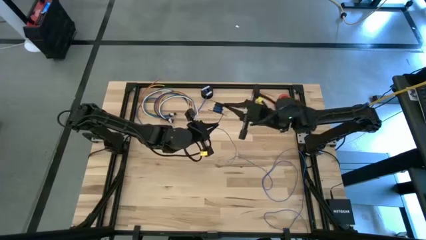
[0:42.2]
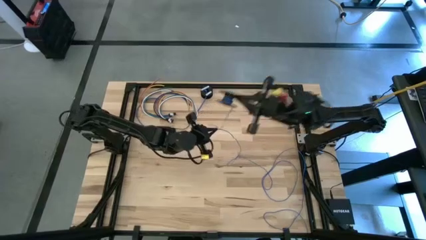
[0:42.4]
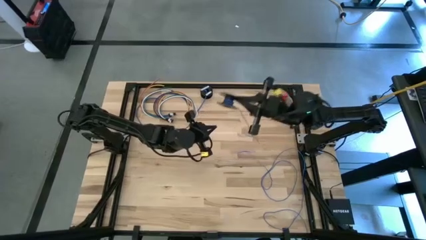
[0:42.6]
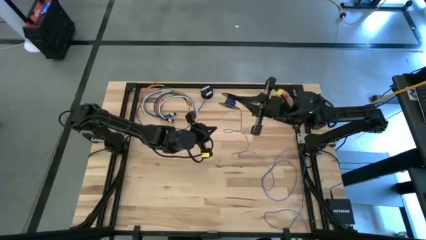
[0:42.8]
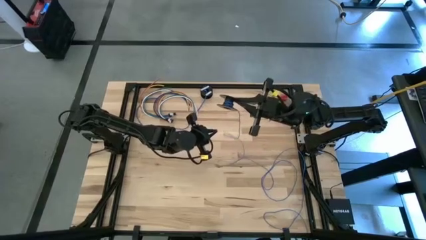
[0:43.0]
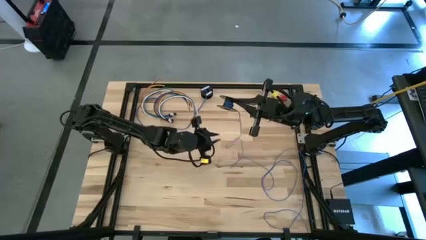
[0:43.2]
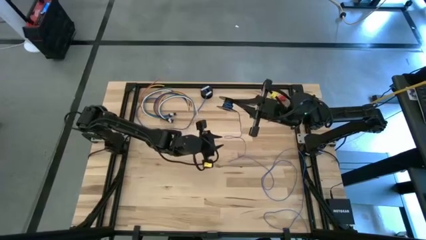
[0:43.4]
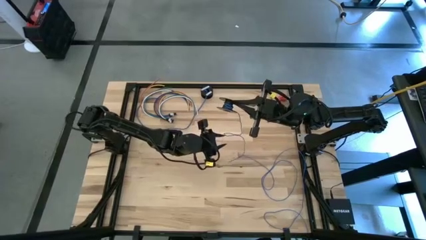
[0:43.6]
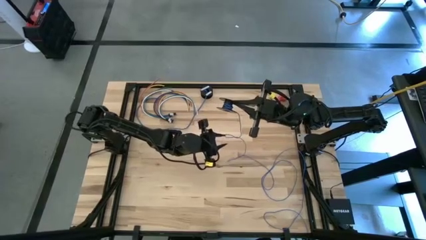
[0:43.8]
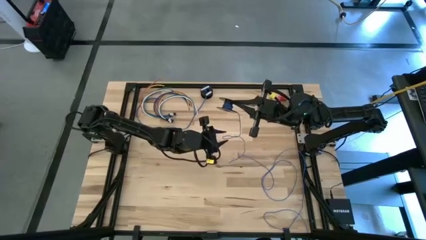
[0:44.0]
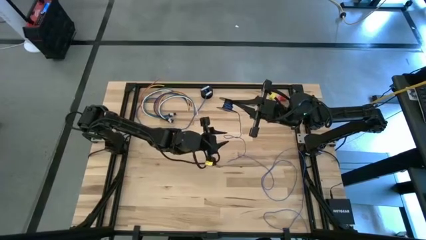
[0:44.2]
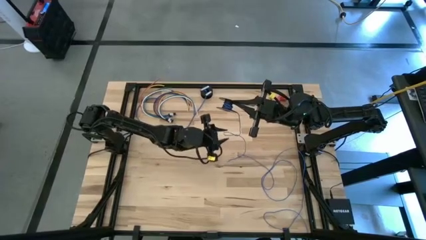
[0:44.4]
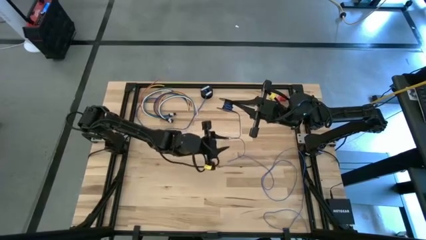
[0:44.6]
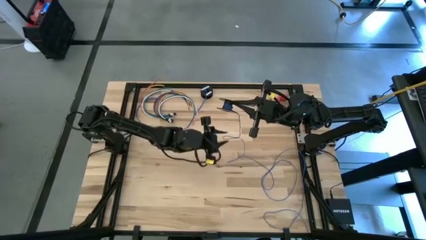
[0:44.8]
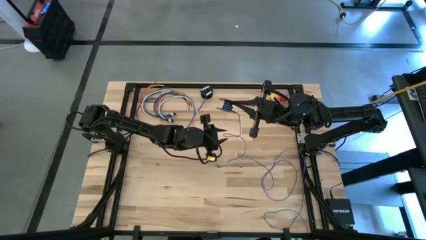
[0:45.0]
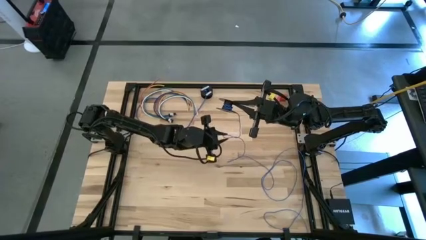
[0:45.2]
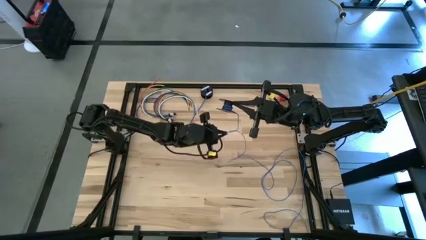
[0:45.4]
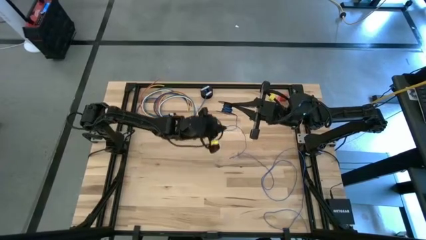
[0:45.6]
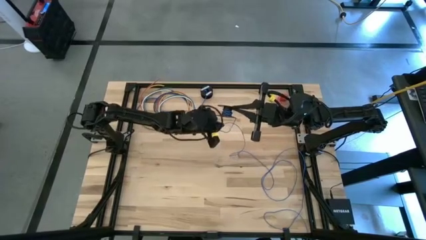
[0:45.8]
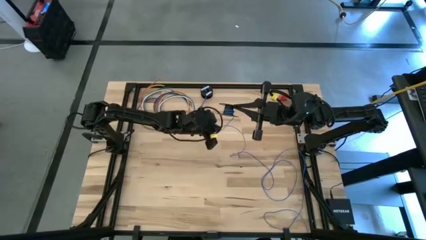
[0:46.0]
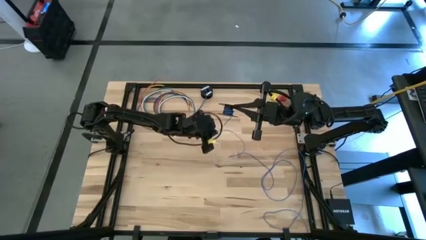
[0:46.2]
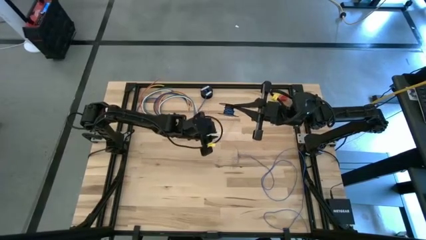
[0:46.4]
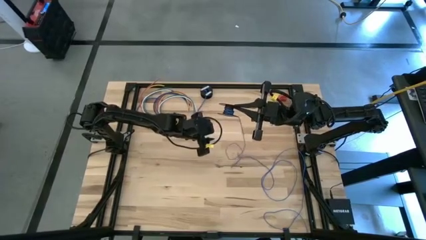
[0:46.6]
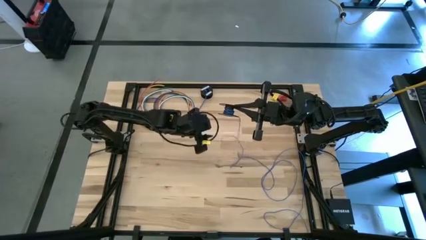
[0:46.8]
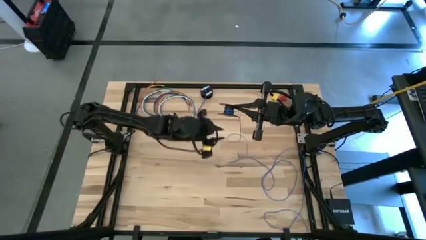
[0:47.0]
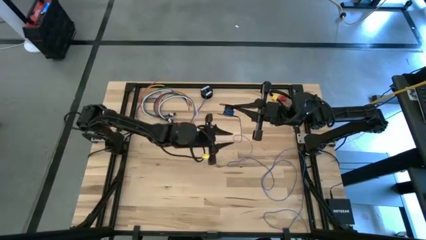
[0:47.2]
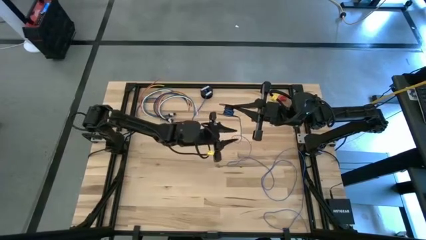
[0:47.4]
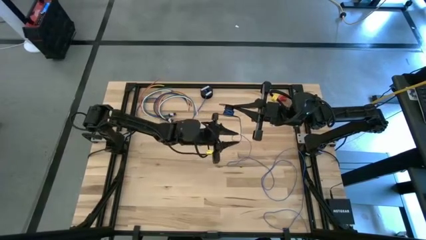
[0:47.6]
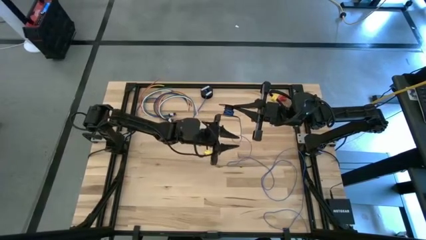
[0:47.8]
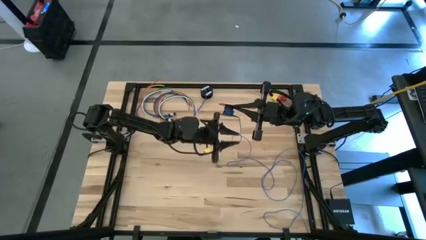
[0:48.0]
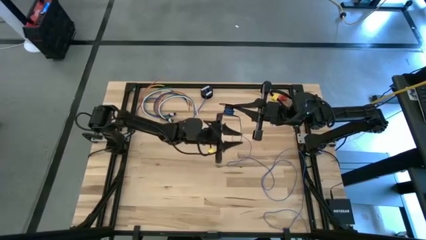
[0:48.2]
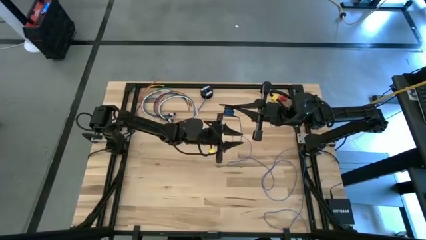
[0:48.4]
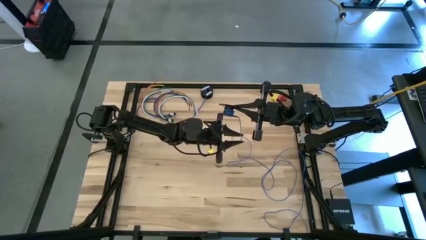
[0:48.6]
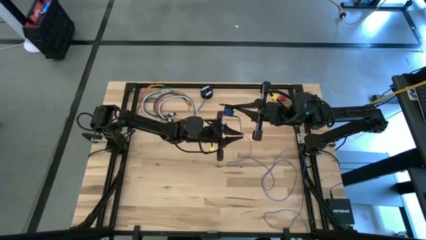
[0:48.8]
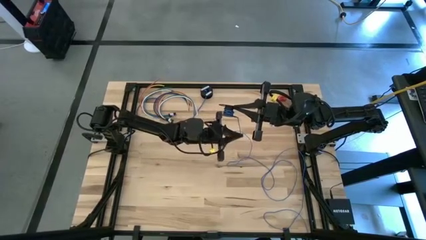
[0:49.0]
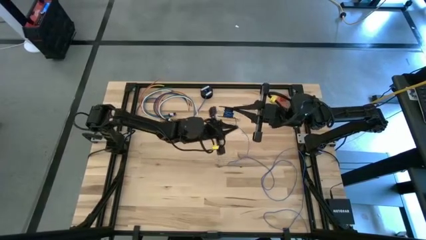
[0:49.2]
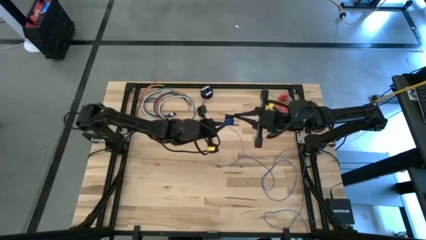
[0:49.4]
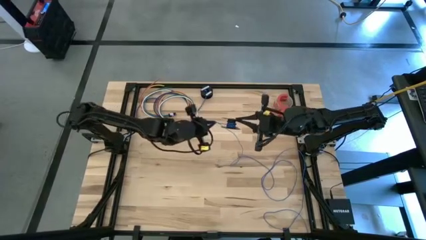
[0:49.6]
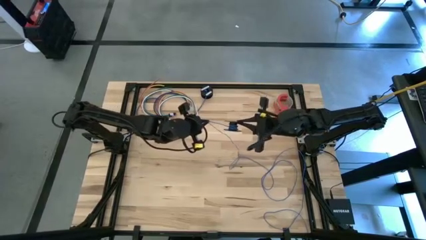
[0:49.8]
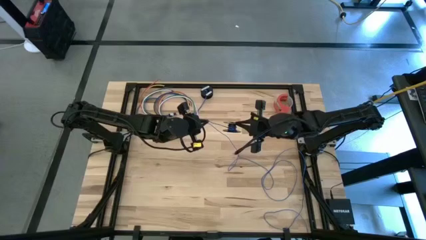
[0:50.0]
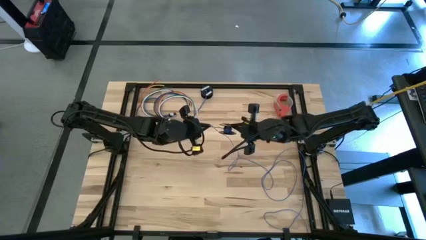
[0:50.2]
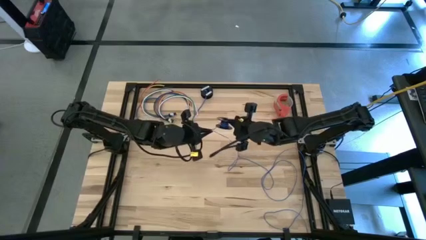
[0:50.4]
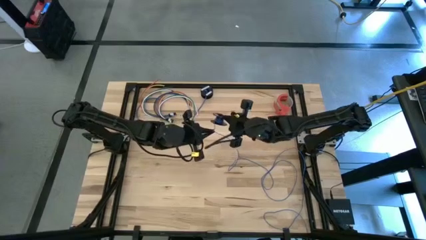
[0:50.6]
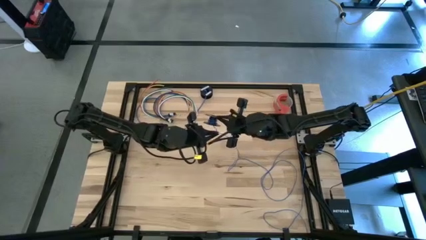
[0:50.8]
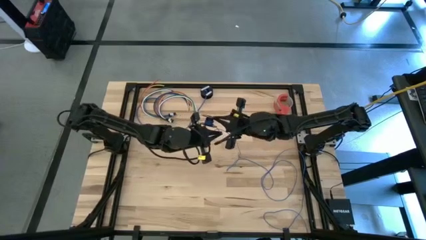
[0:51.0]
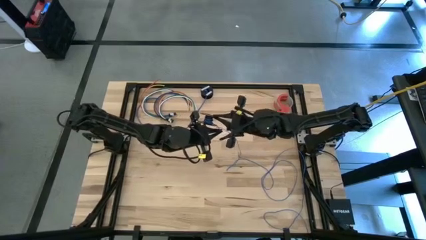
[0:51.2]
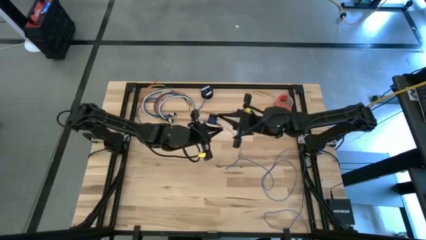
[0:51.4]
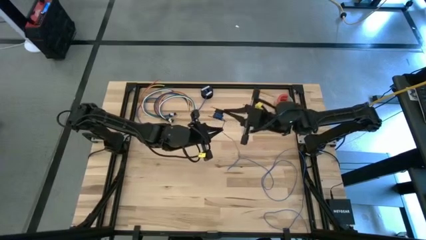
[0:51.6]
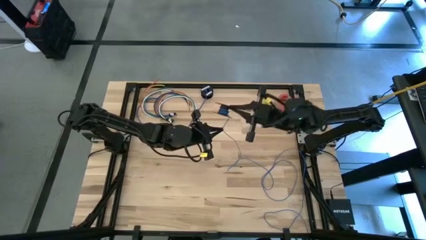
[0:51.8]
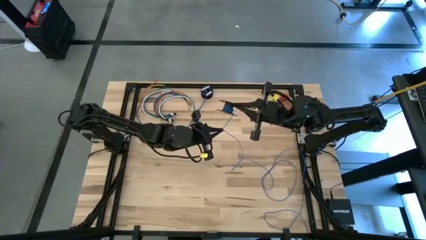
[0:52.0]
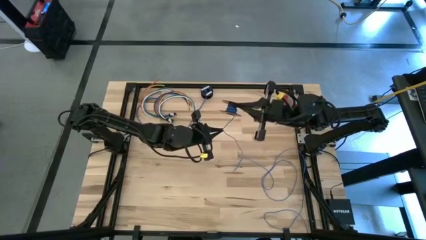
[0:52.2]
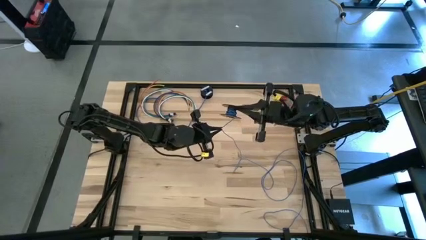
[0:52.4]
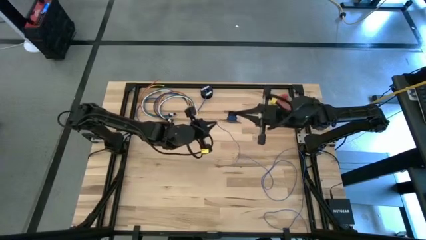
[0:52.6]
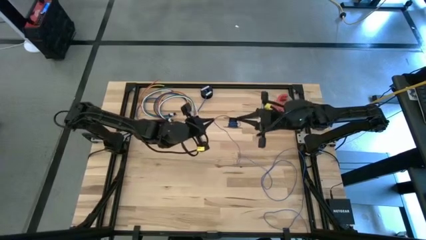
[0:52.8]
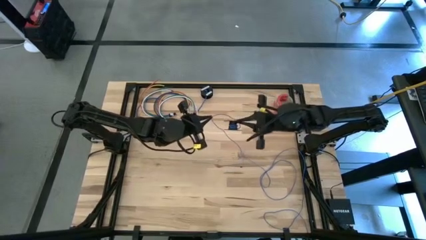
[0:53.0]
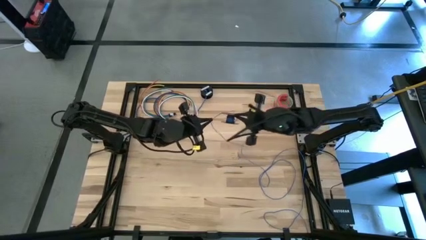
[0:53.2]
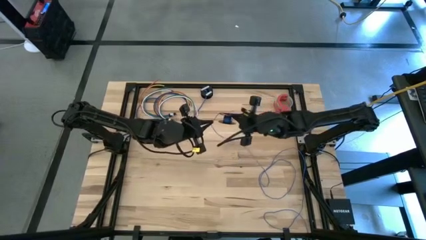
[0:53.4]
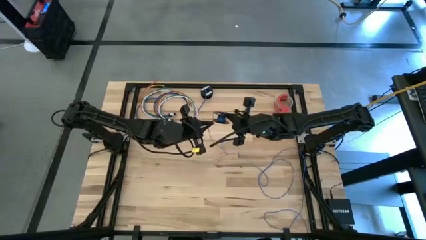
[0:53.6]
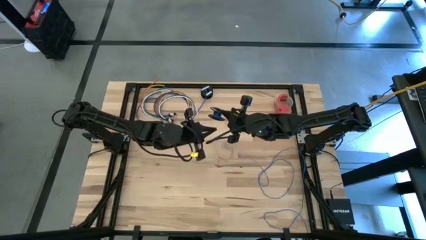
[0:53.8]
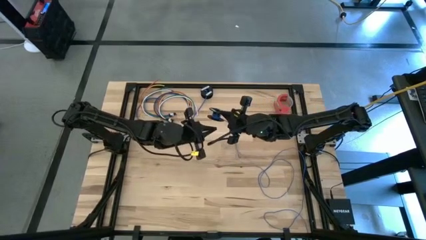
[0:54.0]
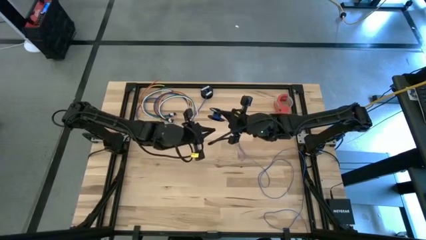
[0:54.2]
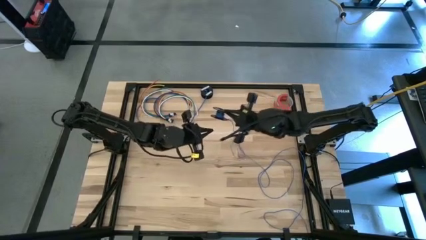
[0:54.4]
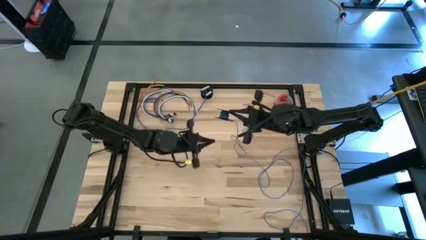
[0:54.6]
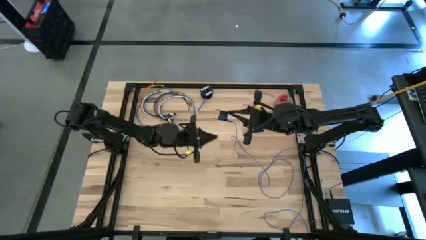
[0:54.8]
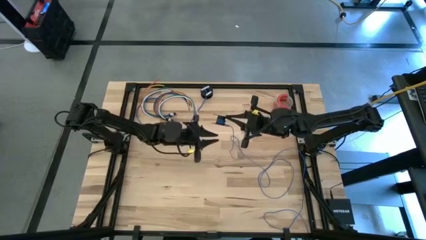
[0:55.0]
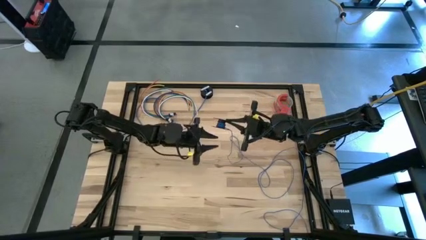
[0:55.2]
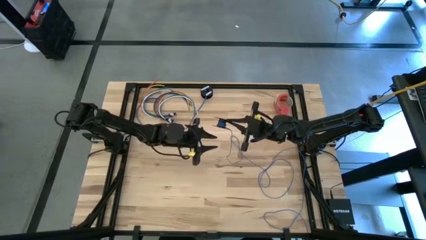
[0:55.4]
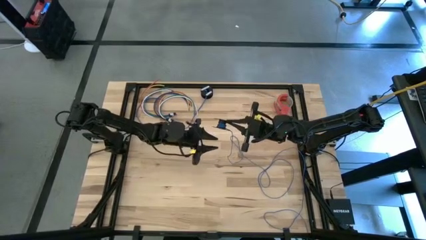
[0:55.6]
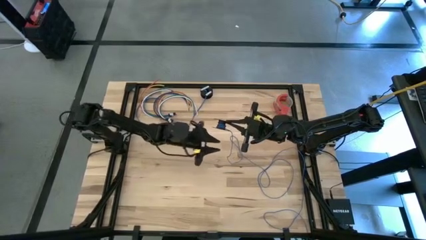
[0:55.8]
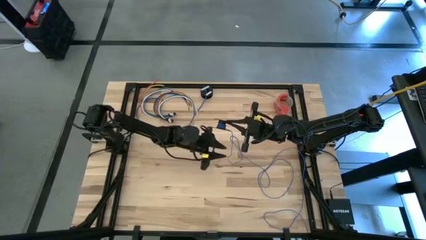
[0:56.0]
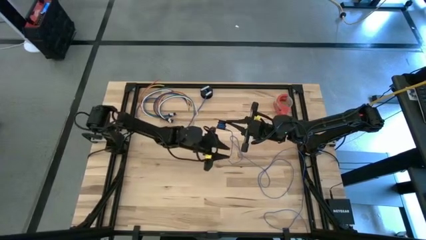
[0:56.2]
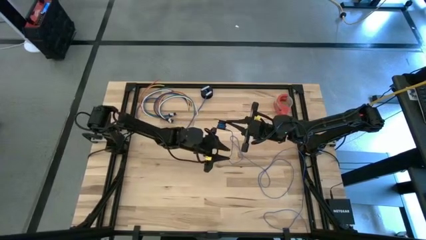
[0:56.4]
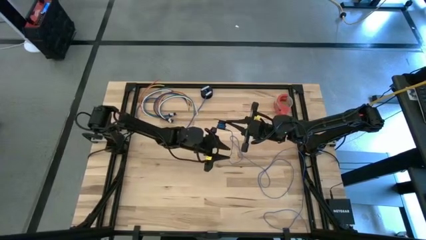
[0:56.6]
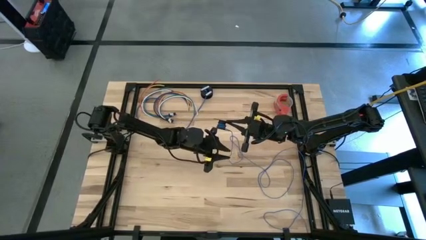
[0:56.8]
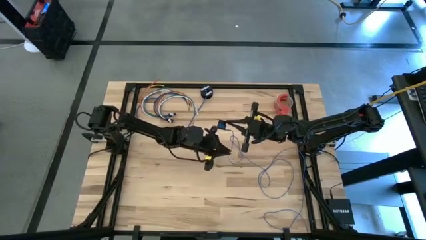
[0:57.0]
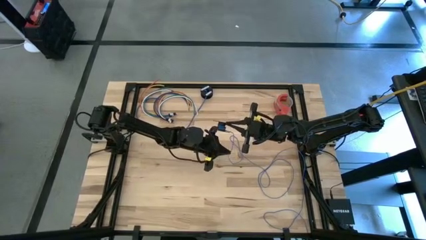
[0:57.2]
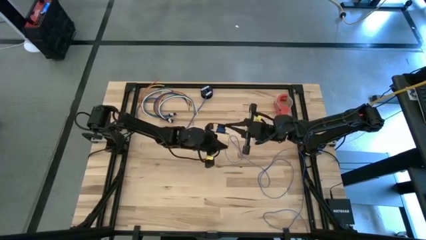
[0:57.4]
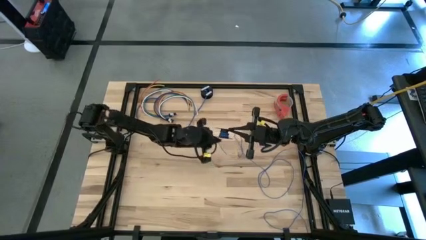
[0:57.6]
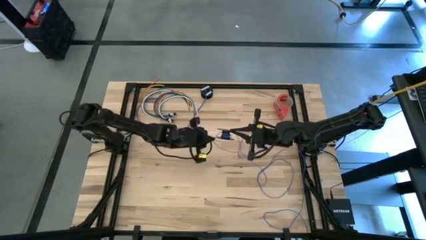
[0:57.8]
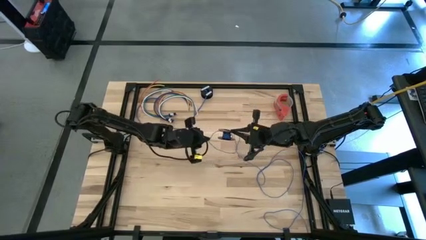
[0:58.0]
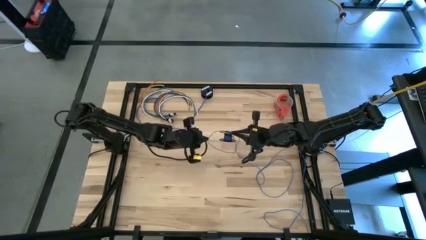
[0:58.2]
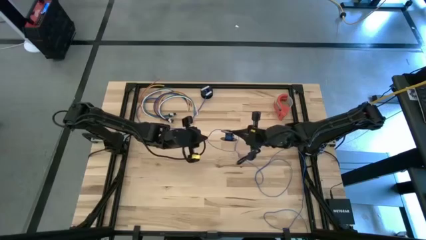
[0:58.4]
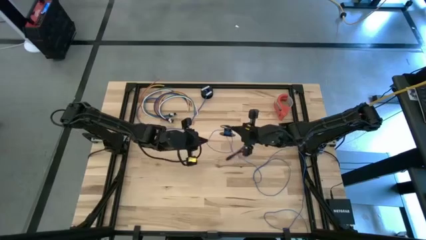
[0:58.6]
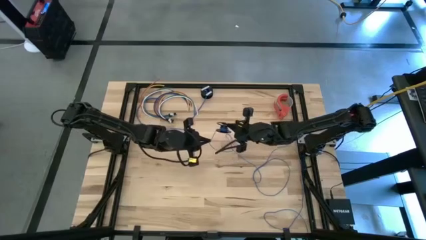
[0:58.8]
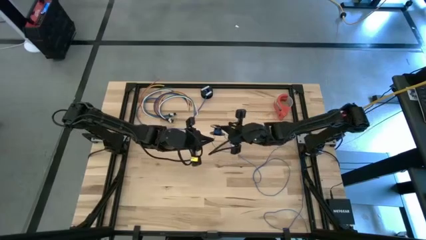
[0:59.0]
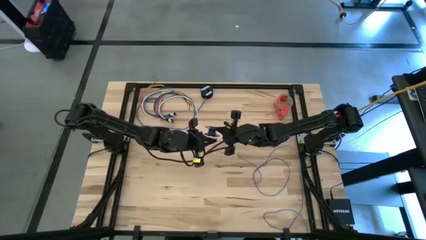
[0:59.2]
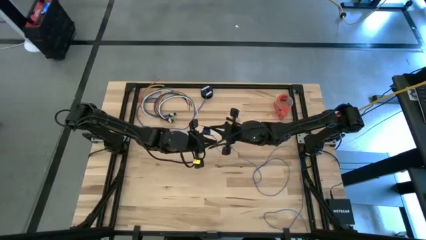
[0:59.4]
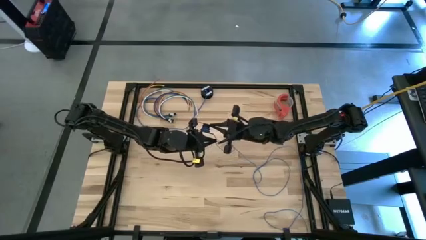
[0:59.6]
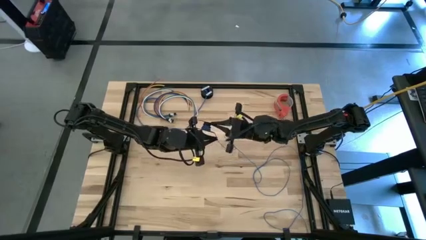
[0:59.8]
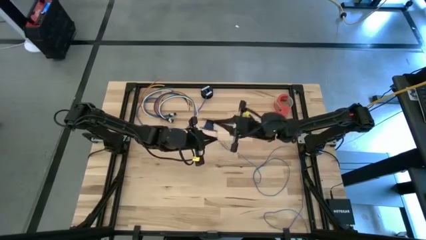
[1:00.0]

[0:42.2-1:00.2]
Task: Coil cords
Coil the blue wire onto the black spool
